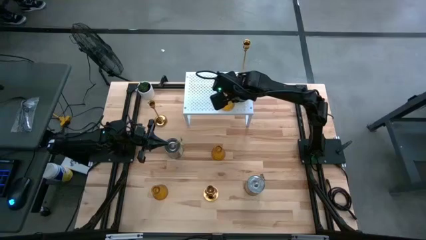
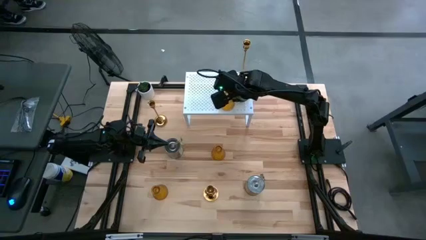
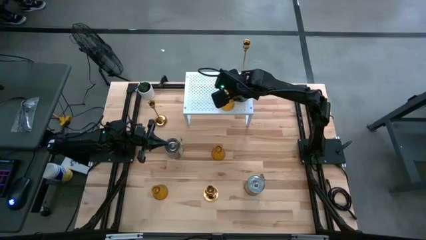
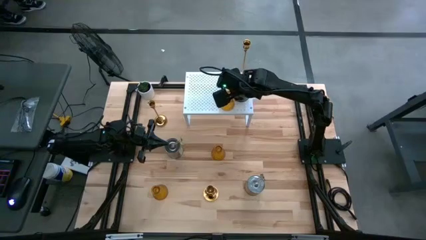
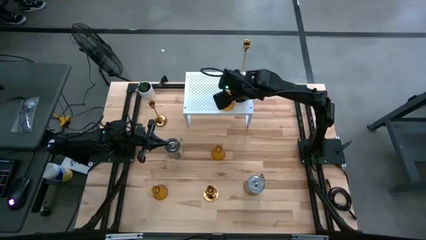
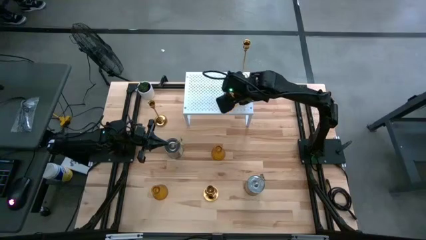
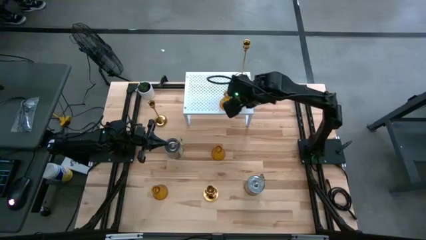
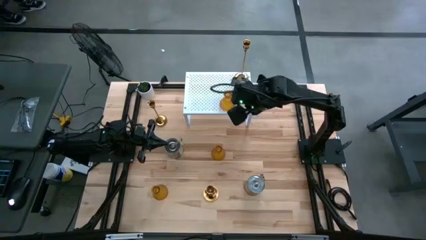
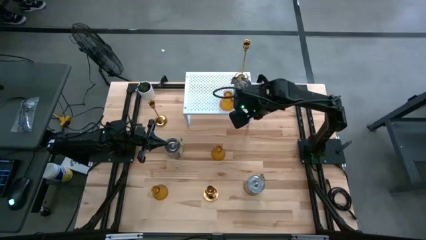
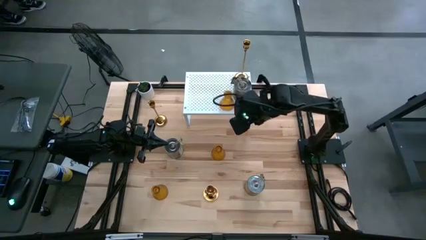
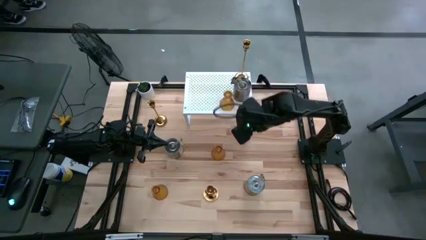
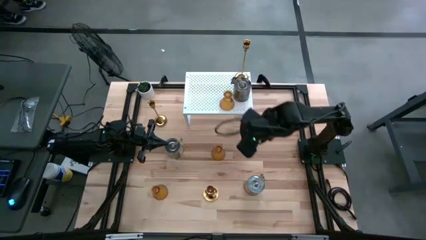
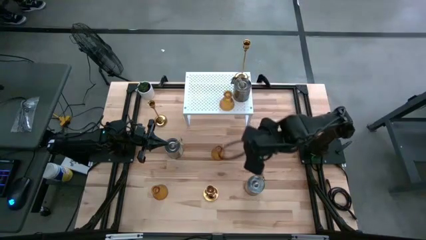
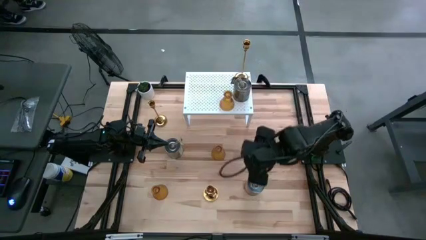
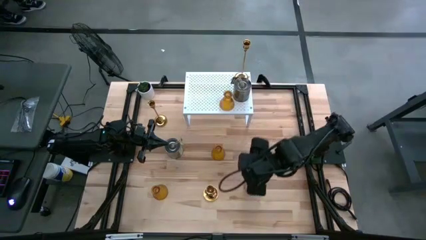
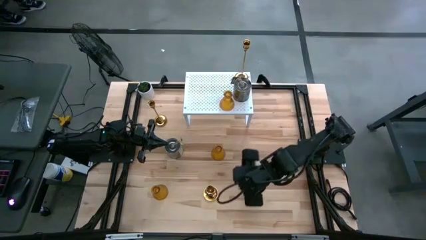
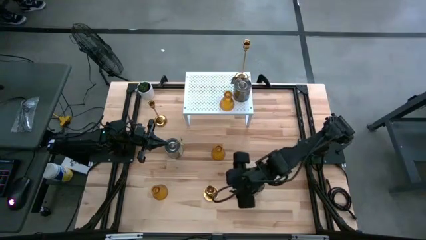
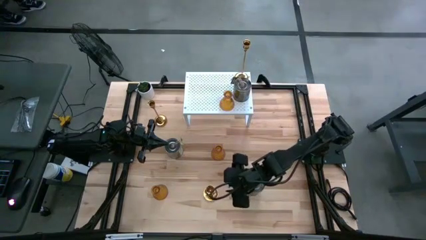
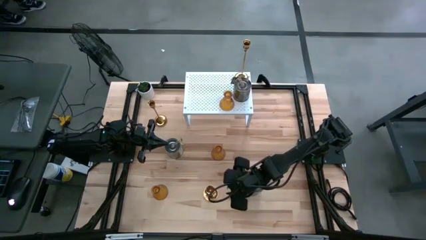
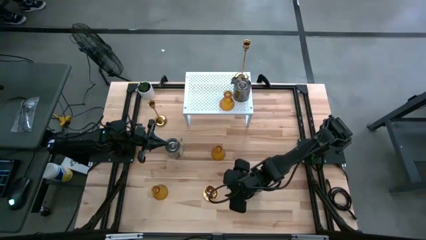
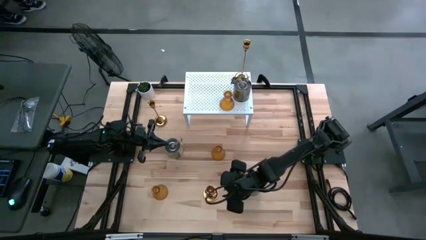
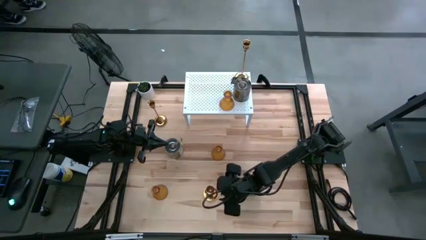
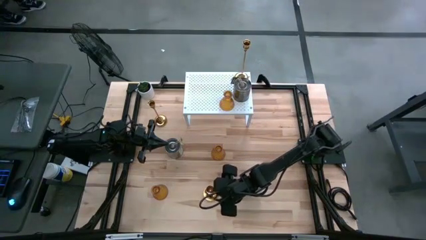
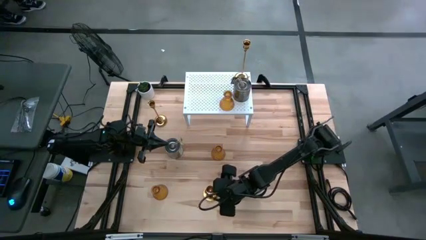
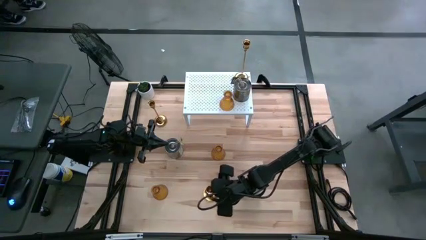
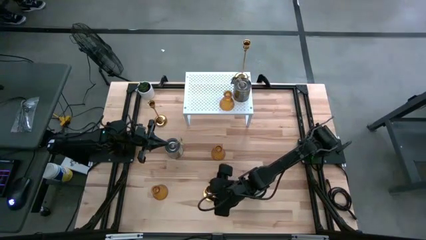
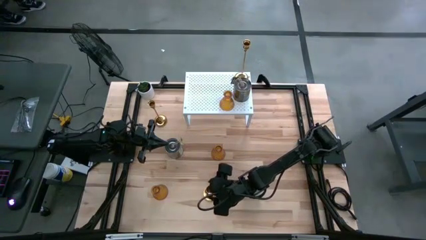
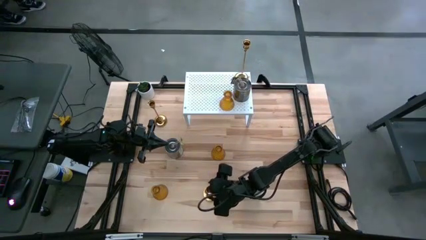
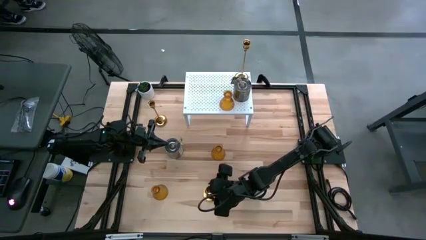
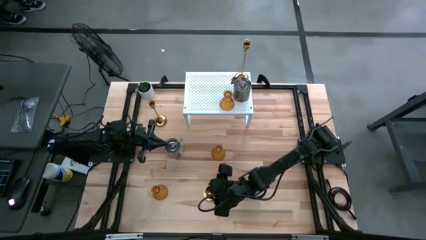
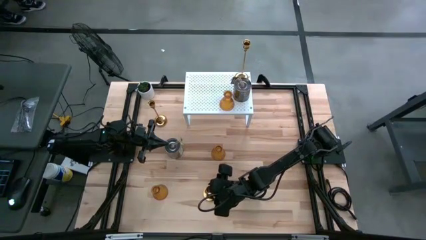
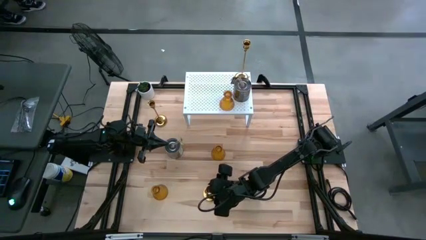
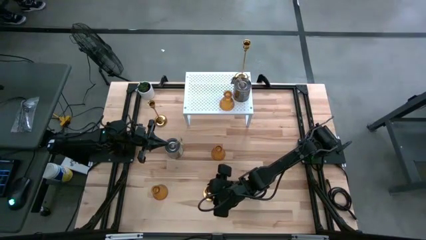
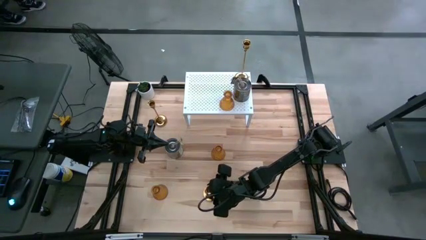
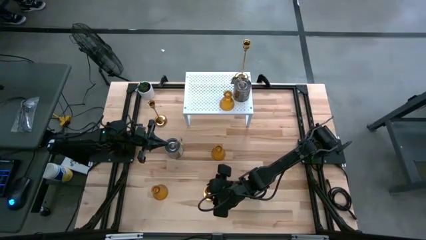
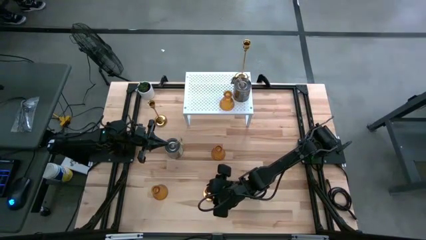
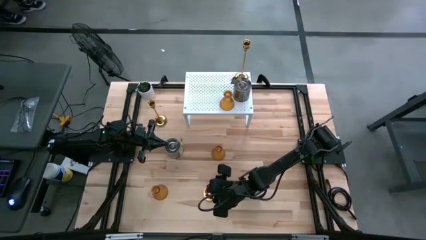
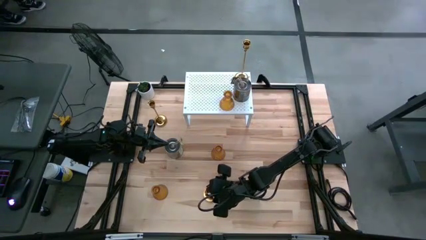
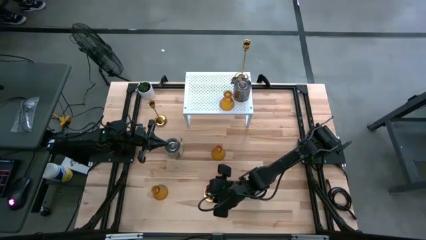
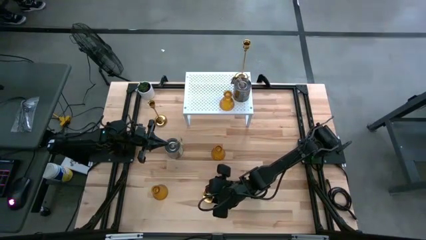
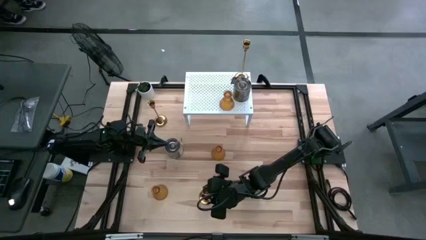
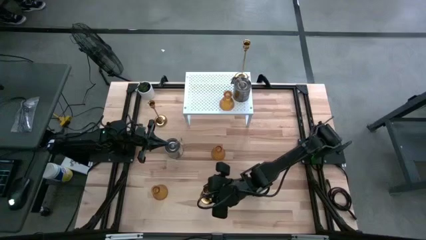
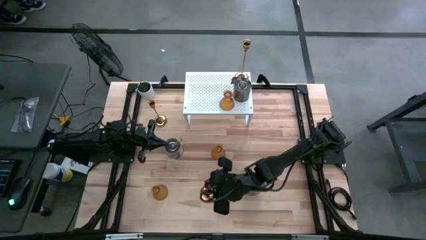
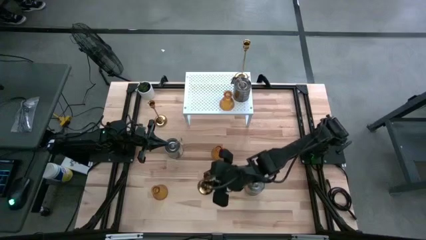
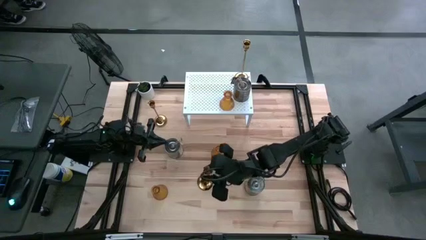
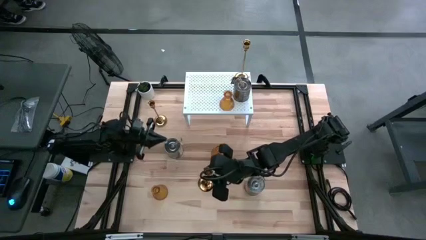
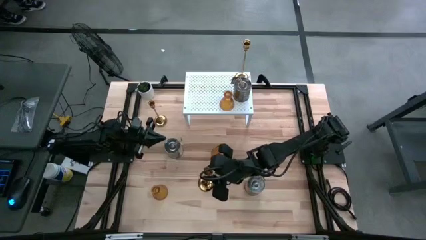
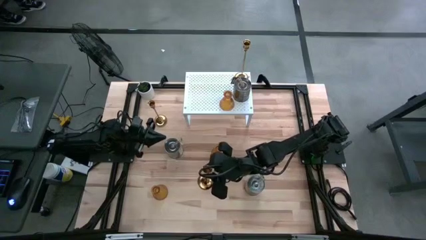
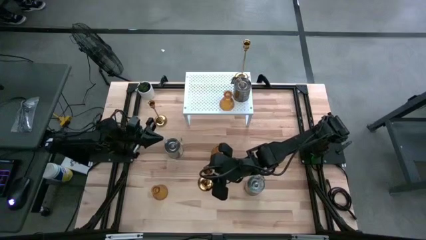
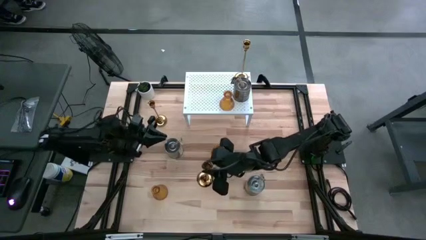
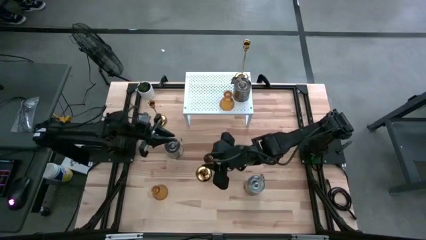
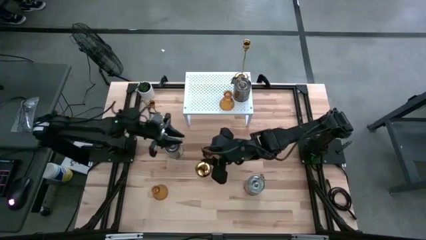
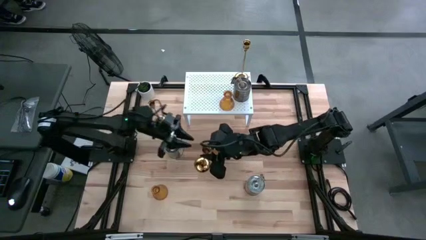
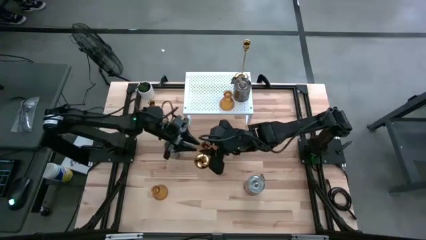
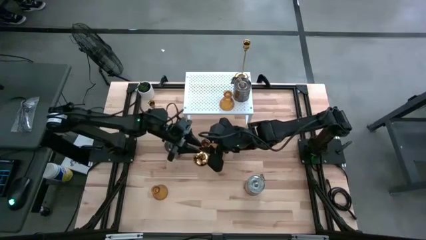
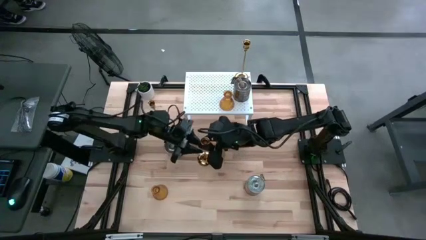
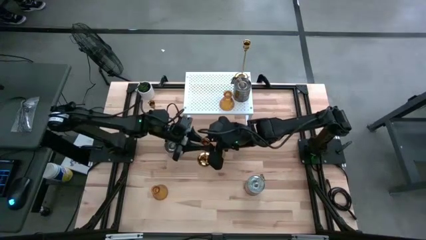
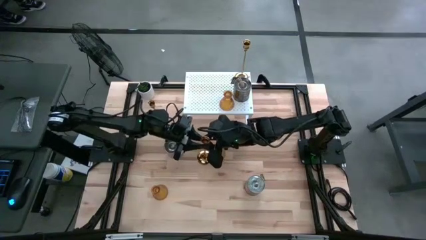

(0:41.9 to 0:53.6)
Task: Pick & Place candle stick holders
Put the bottom gold candle holder on the shelf

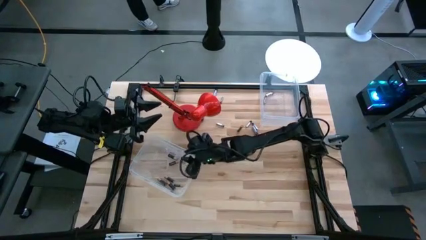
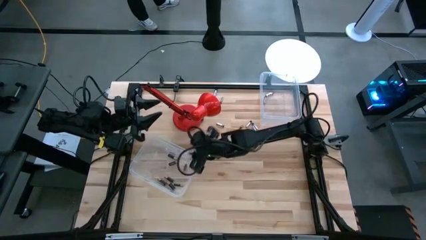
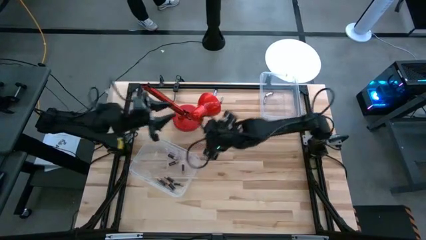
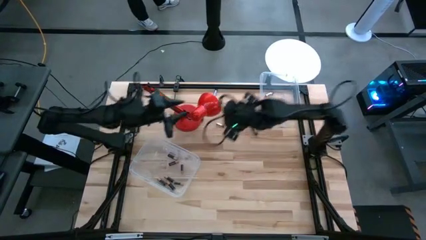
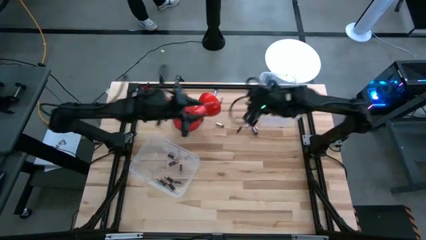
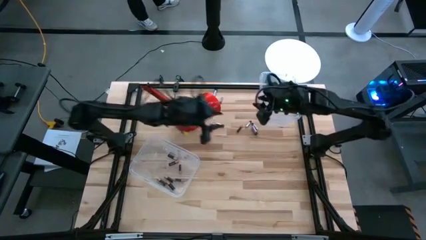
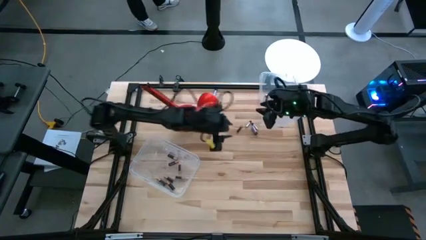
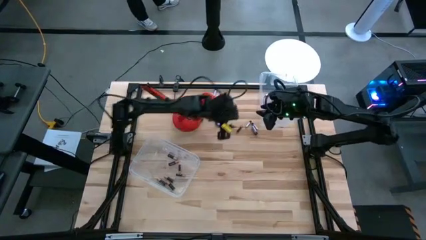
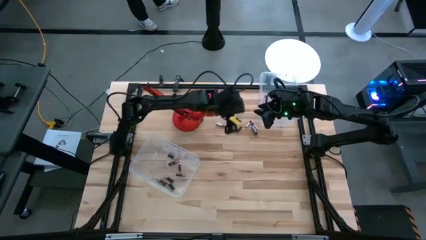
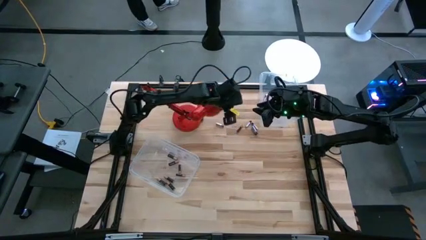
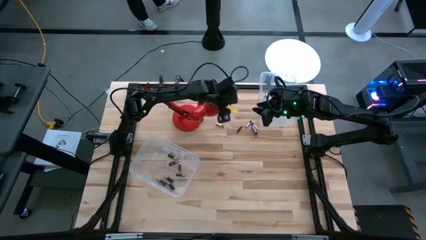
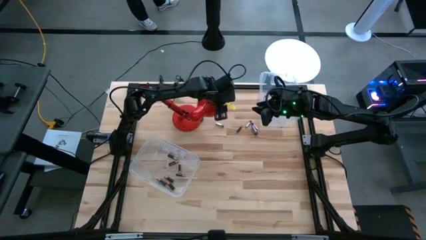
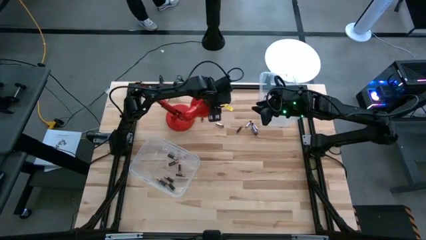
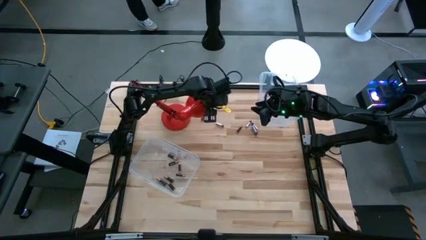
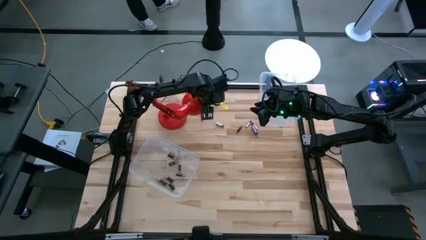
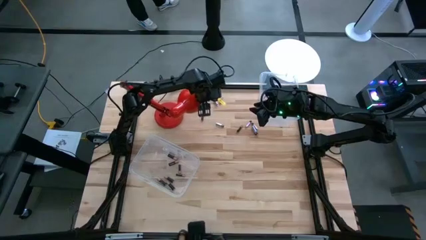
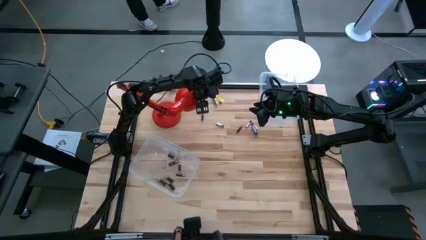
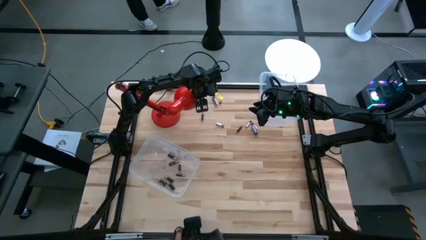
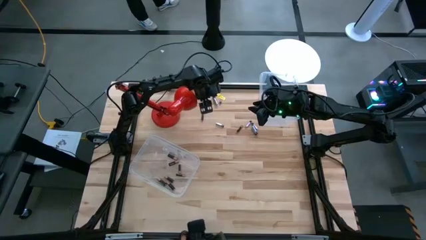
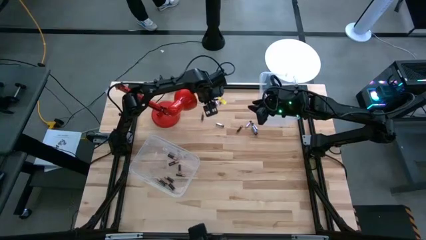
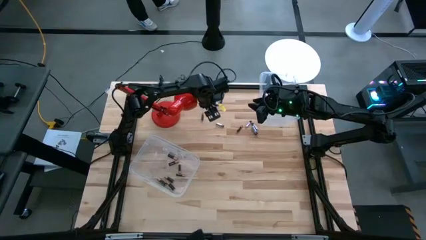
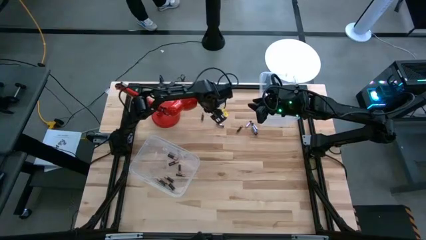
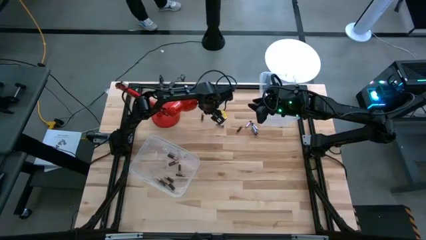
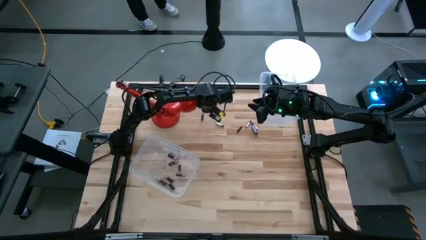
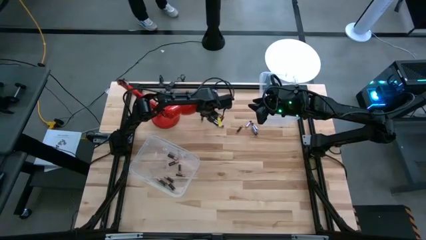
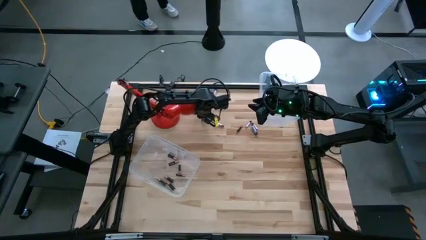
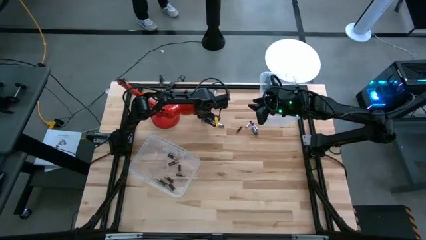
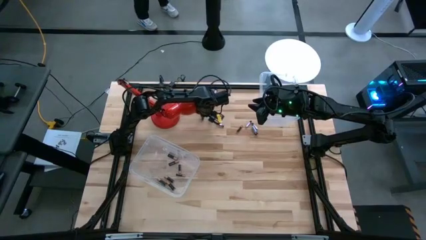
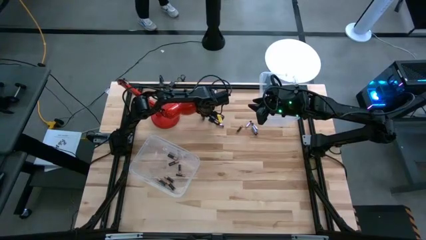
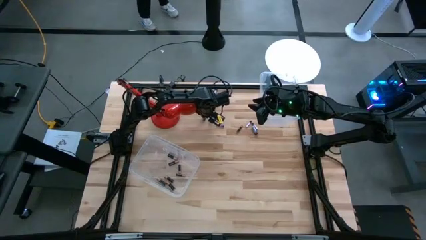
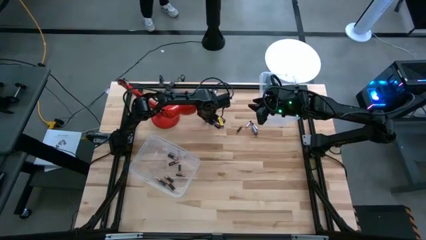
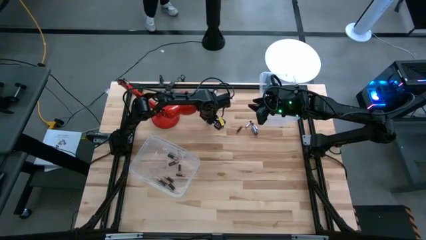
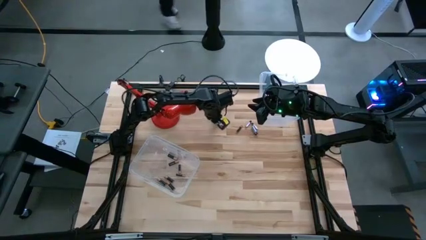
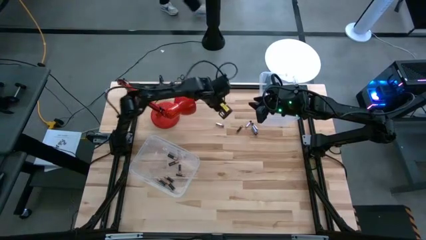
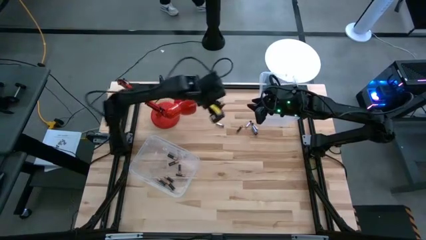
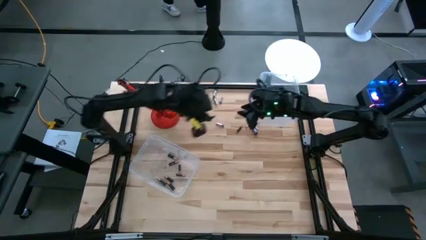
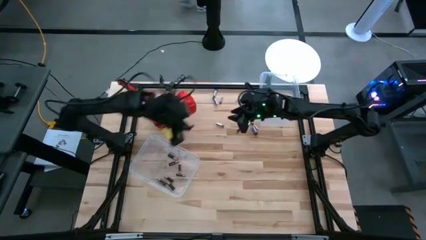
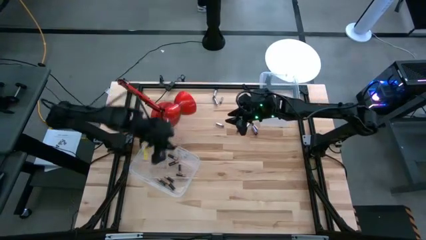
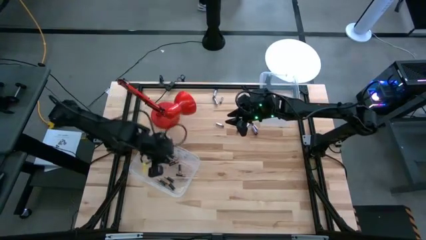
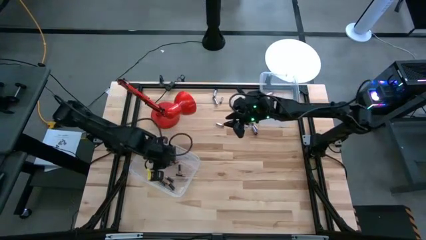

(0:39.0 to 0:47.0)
Task: Sort batteries
Put the black battery into the bottom transparent bin
